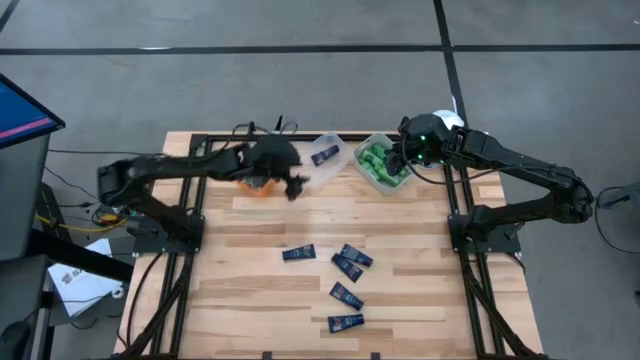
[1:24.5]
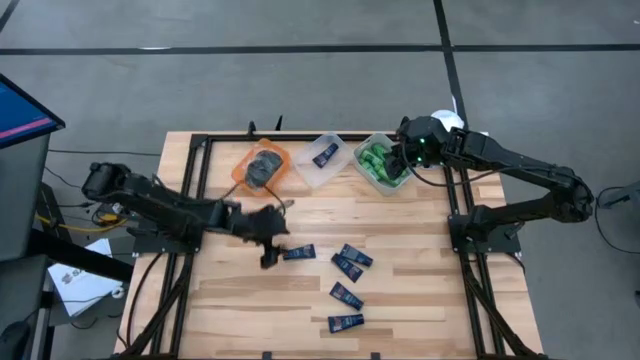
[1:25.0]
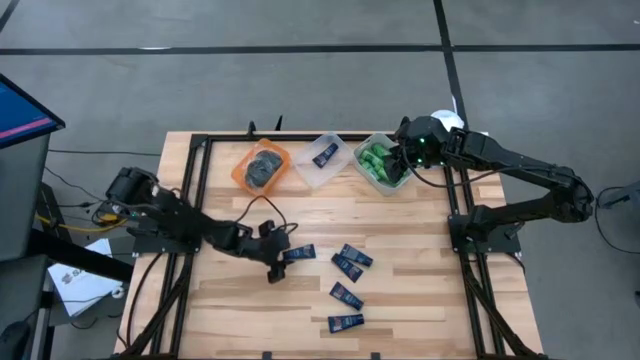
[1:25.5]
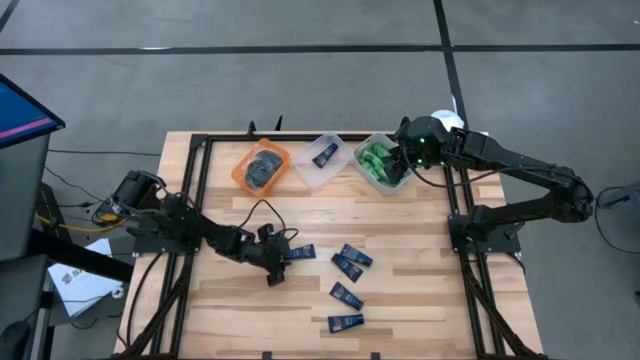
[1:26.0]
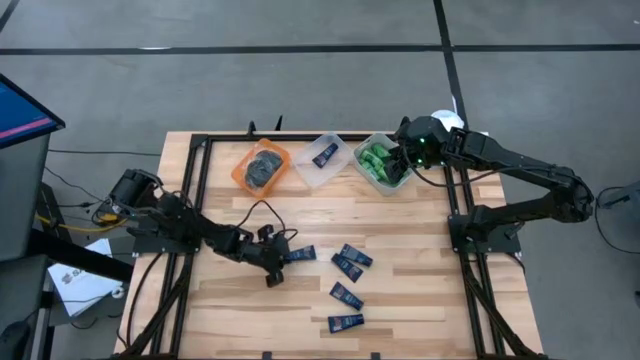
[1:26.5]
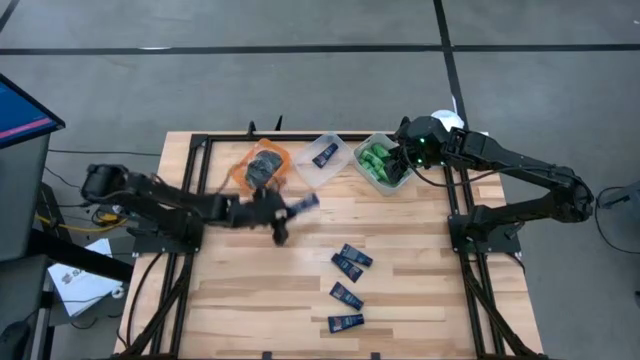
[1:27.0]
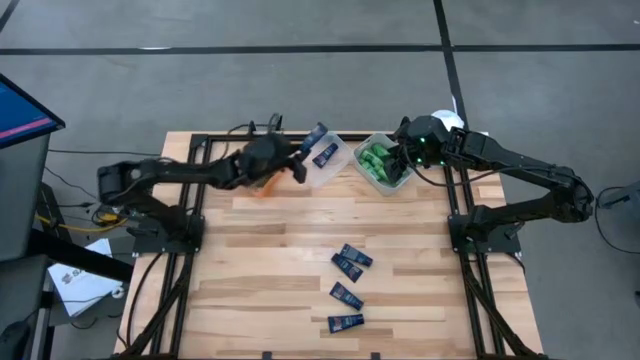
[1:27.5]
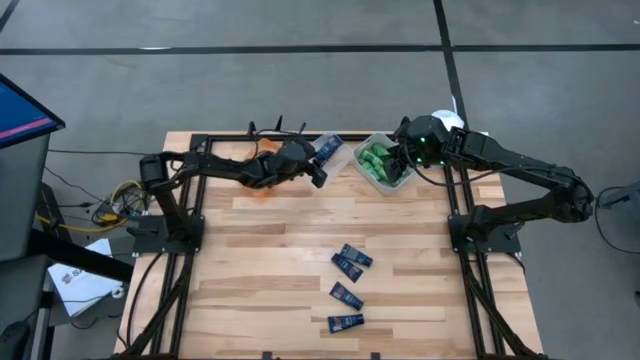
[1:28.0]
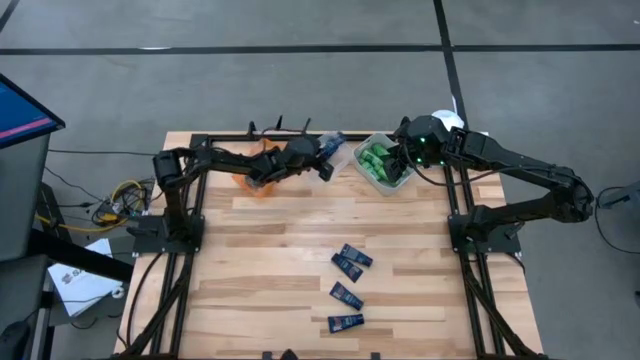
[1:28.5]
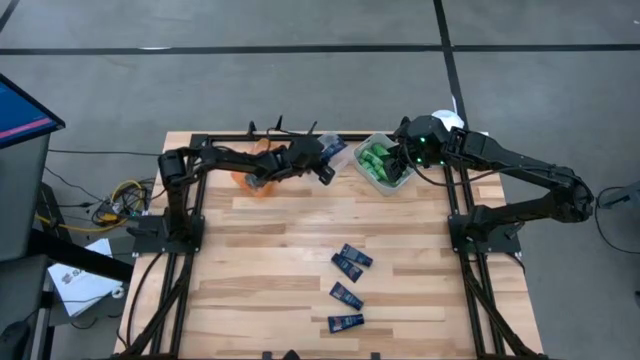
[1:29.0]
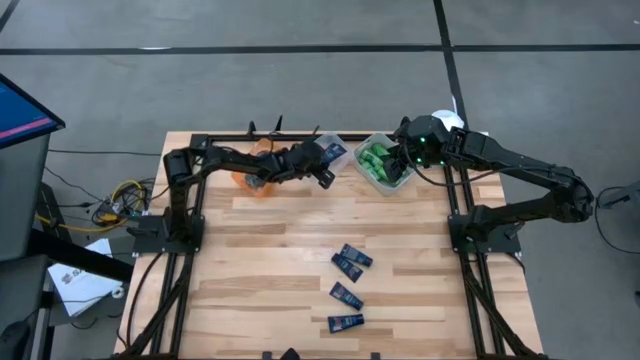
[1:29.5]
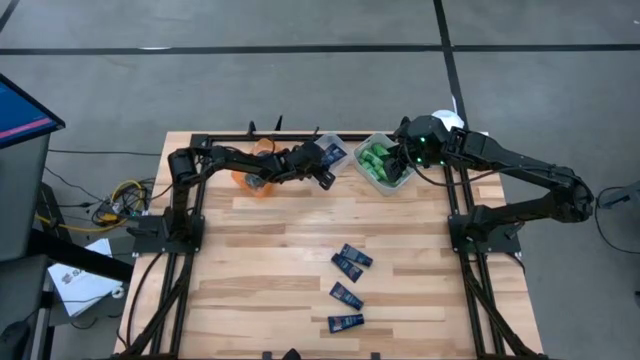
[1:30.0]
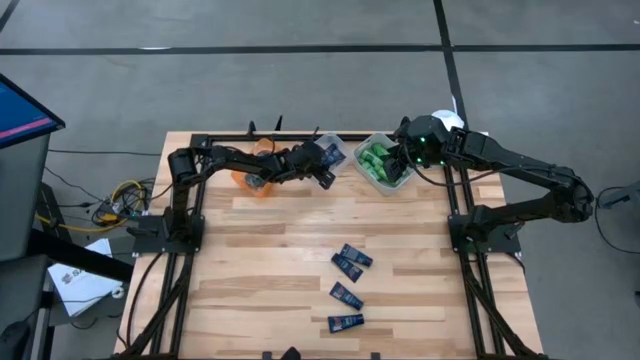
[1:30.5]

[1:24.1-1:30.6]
Task: Pick & Place Travel size toiletries
Put the dark blue shave cream into the transparent bin

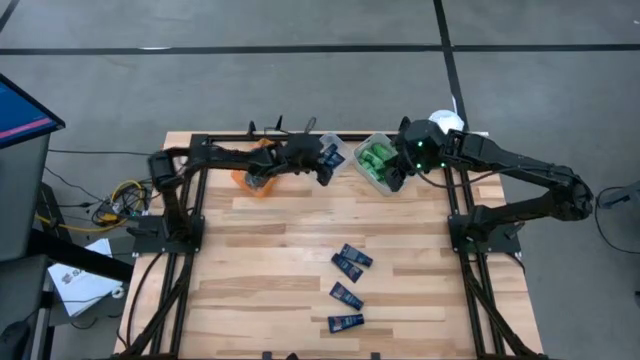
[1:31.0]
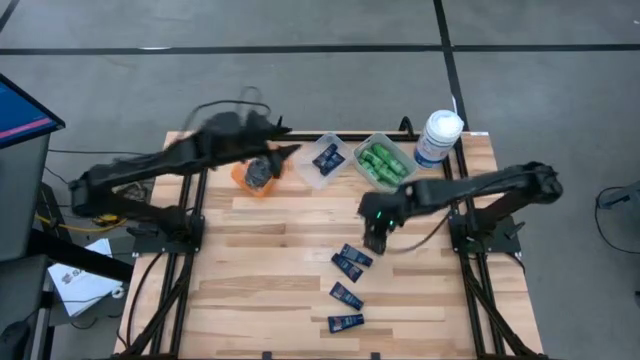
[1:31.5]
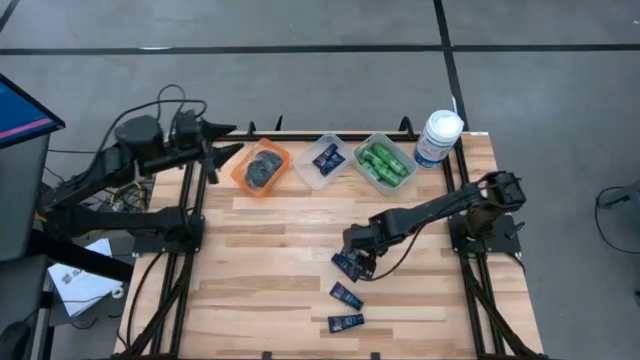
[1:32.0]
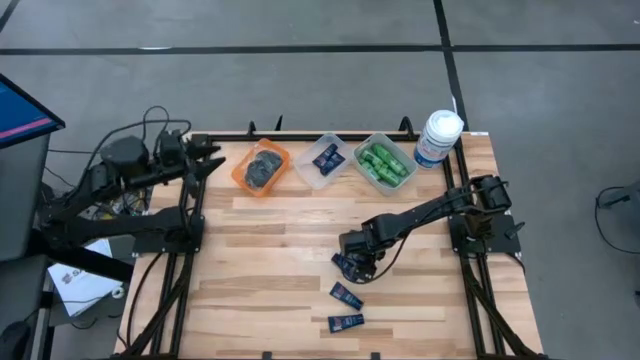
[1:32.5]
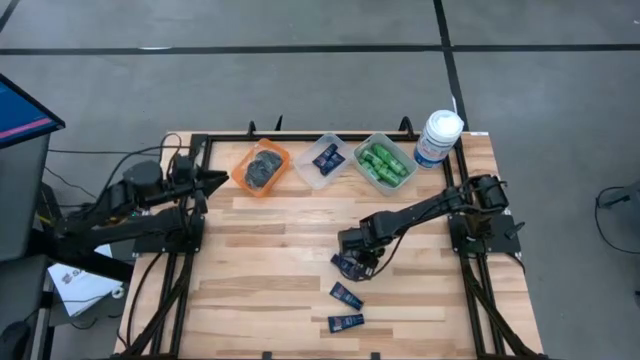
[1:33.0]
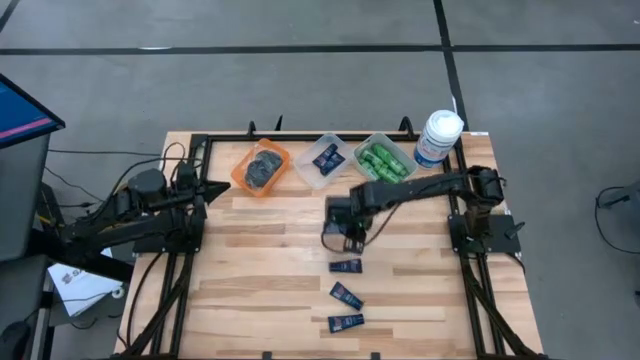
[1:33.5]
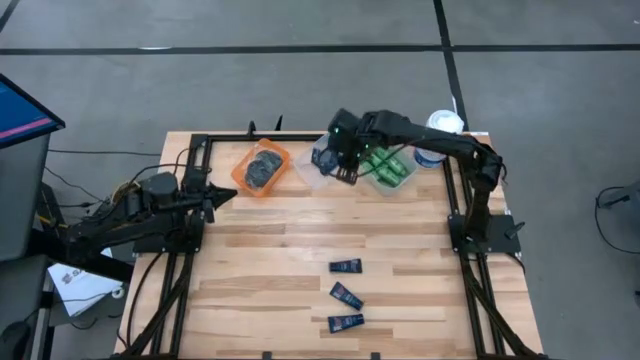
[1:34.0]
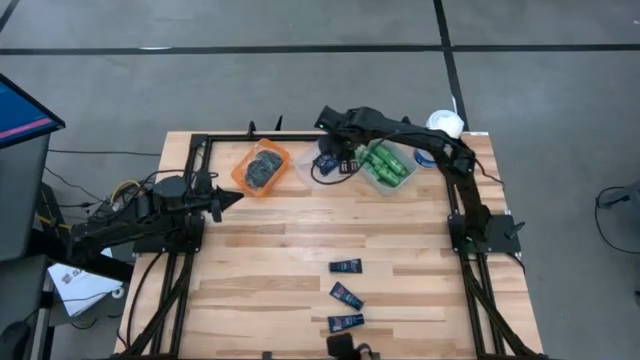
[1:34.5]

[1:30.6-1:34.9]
Put the dark blue shave cream into the transparent bin

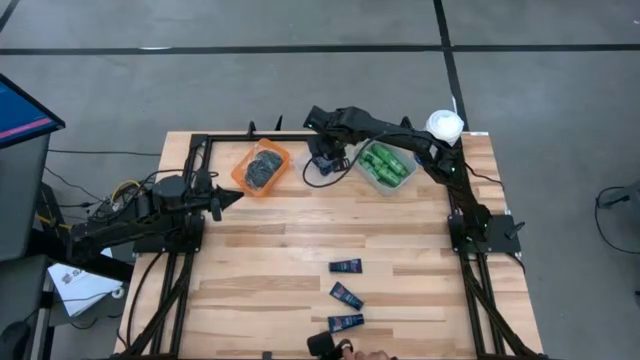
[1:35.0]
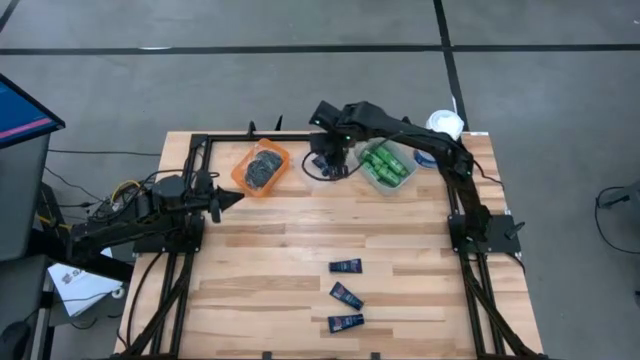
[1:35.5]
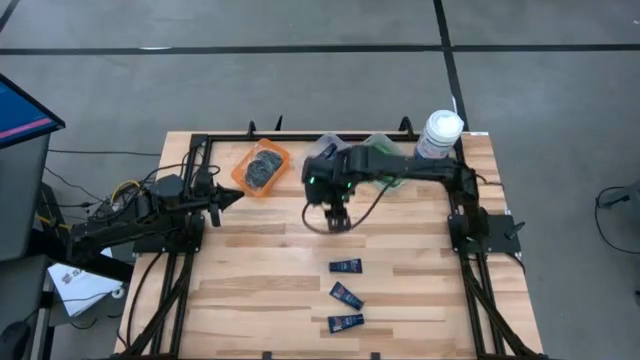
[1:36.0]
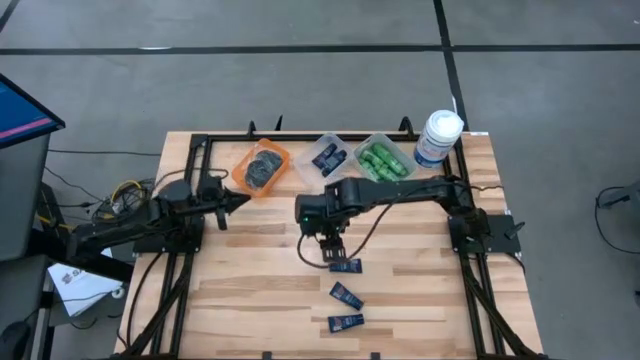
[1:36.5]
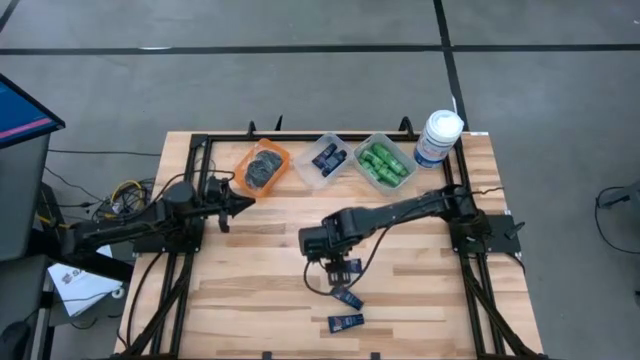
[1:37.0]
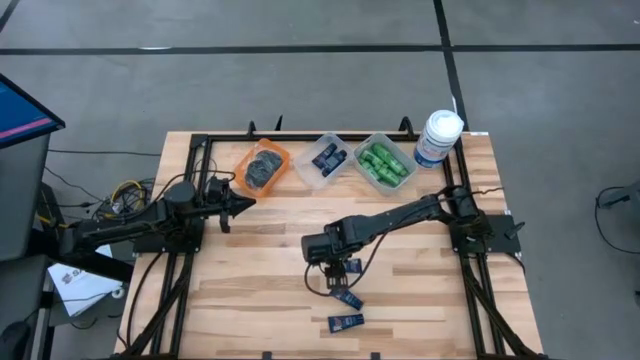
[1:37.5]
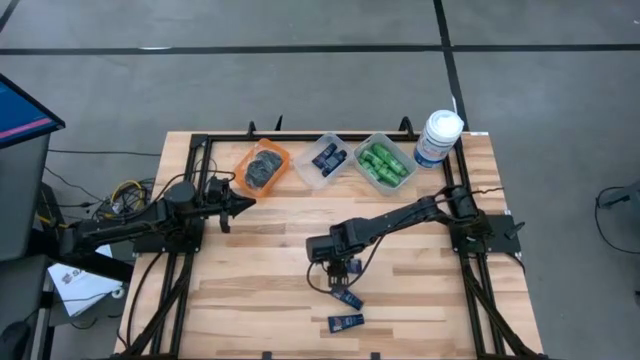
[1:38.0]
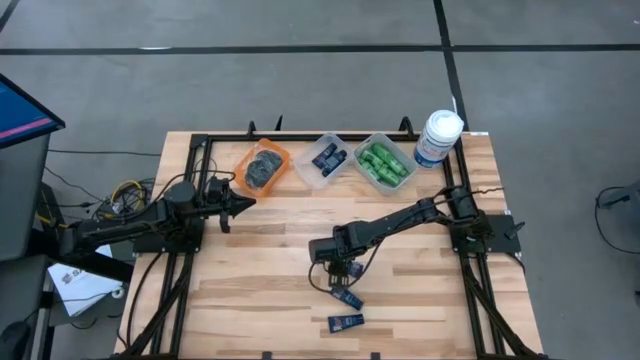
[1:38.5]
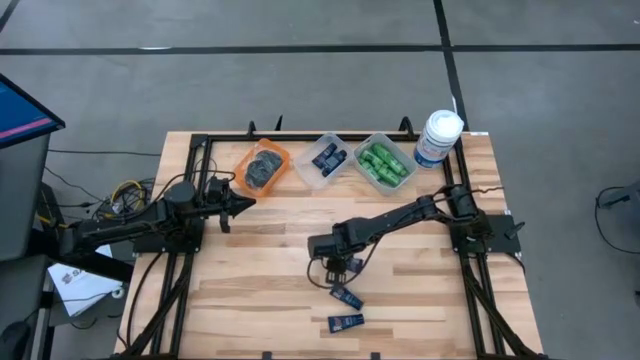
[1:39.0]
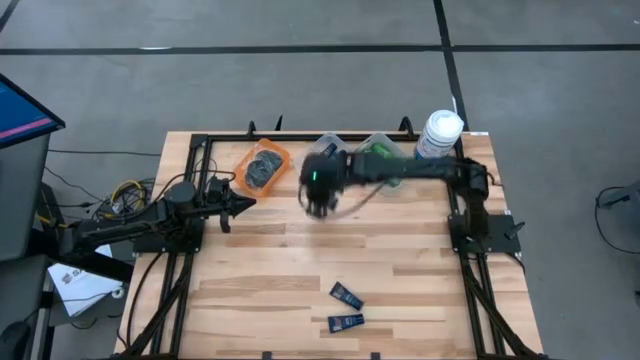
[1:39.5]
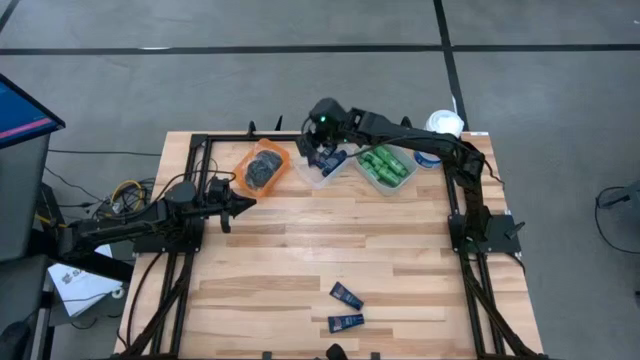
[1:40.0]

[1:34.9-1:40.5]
Put the dark blue shave cream into the transparent bin

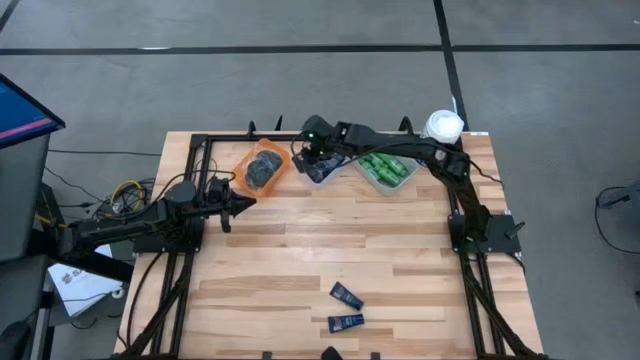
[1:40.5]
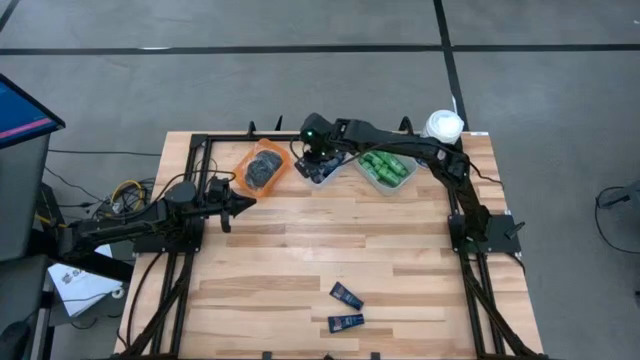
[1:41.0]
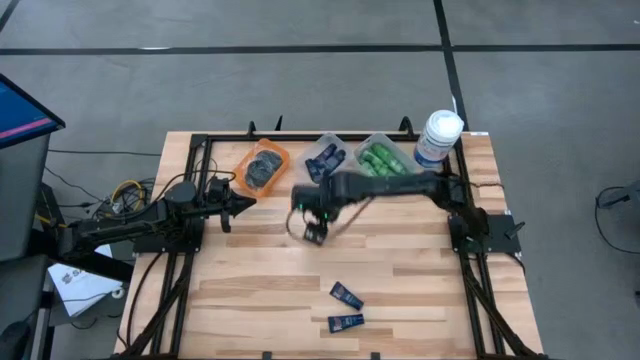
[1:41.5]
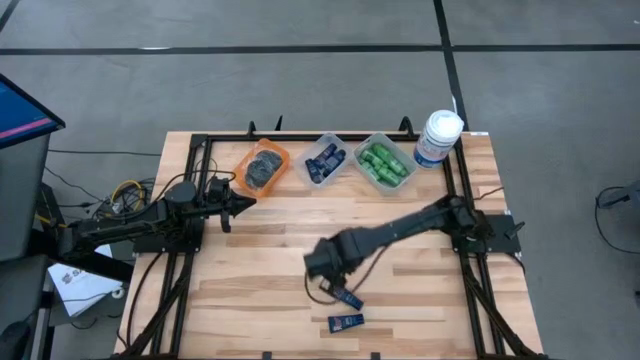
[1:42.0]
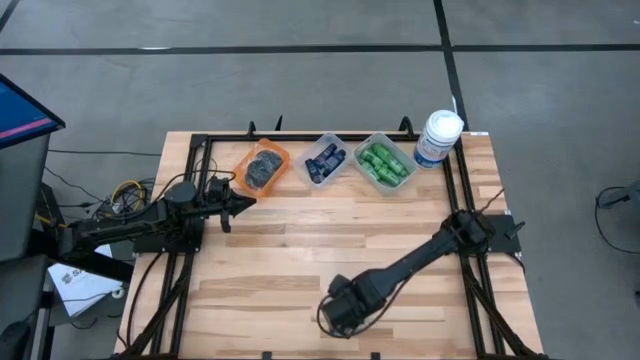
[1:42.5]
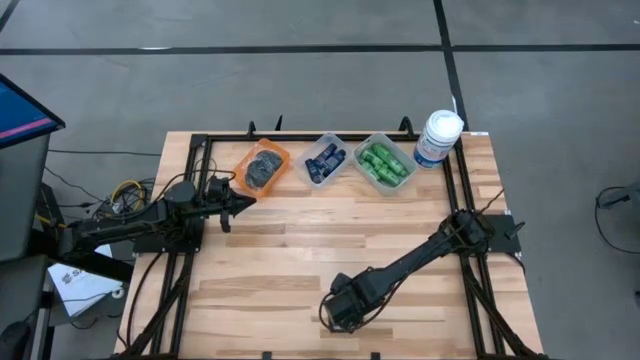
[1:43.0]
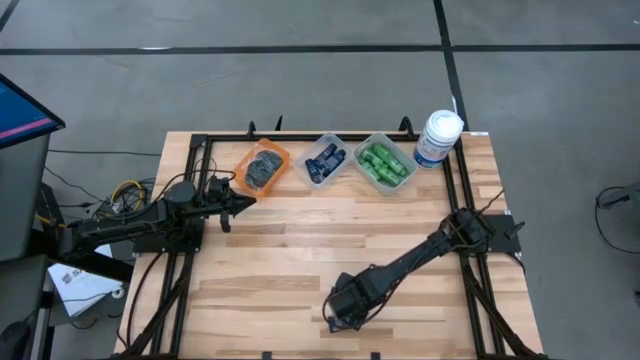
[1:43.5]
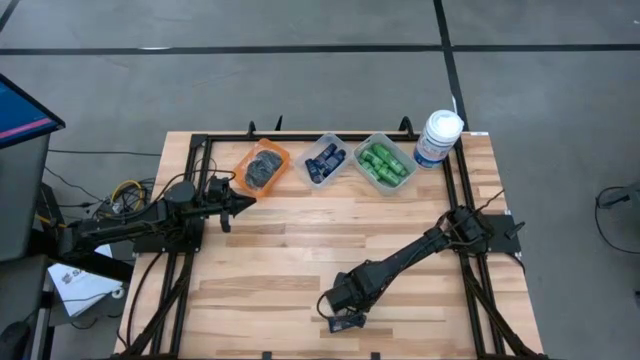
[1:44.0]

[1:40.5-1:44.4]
Put the dark blue shave cream into the transparent bin

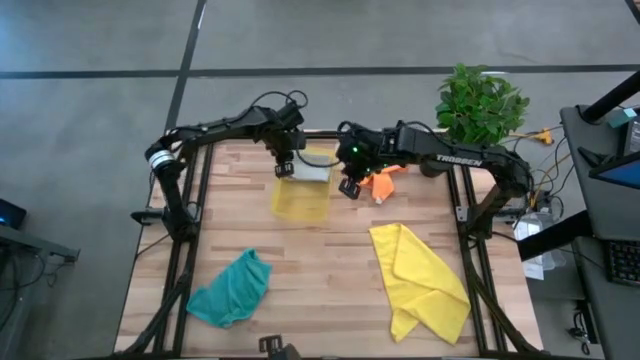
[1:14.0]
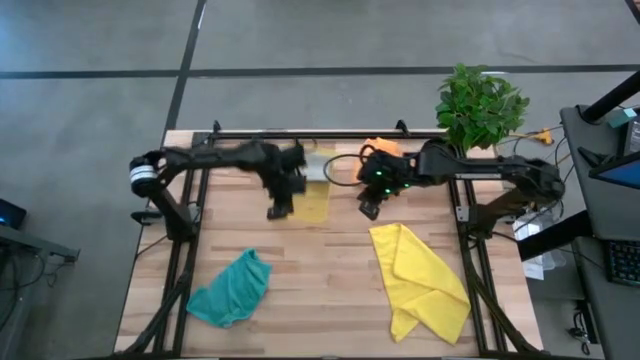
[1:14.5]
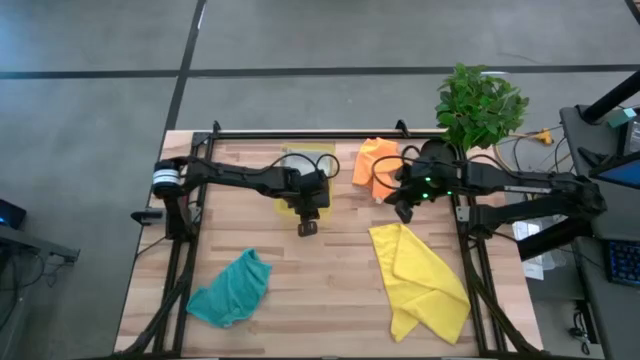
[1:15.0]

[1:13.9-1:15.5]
Task: Fold microfiber towels
Adjust the yellow bin on the table
